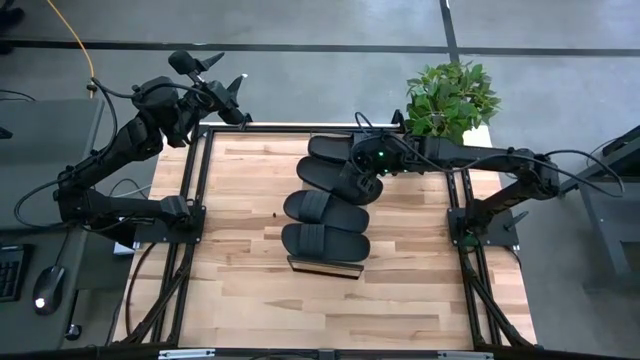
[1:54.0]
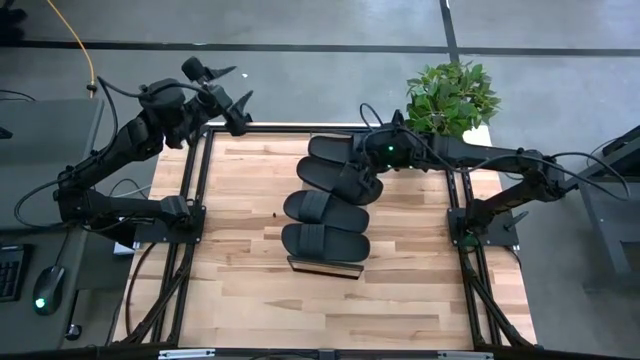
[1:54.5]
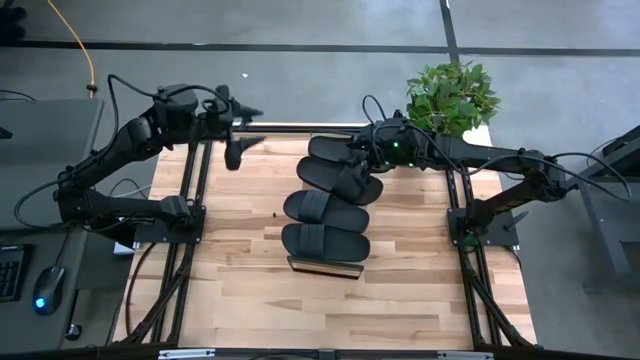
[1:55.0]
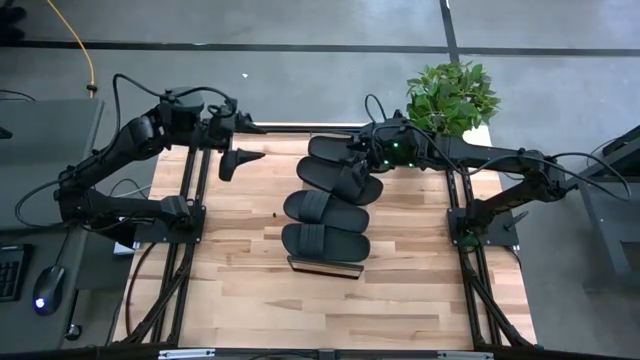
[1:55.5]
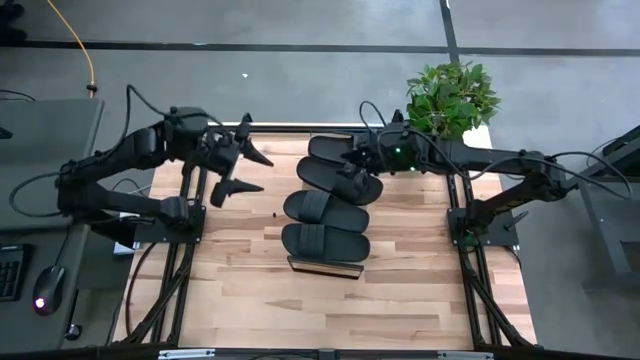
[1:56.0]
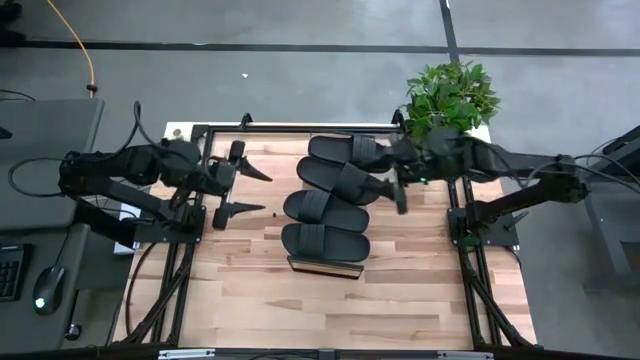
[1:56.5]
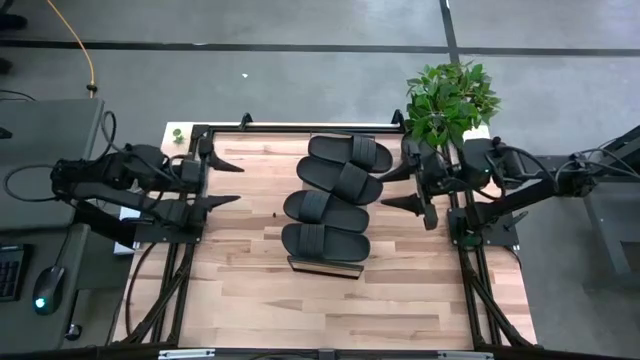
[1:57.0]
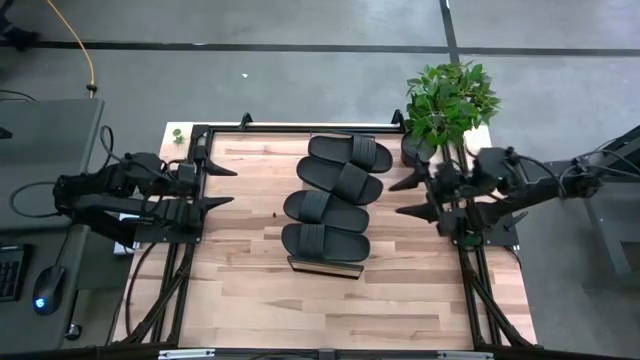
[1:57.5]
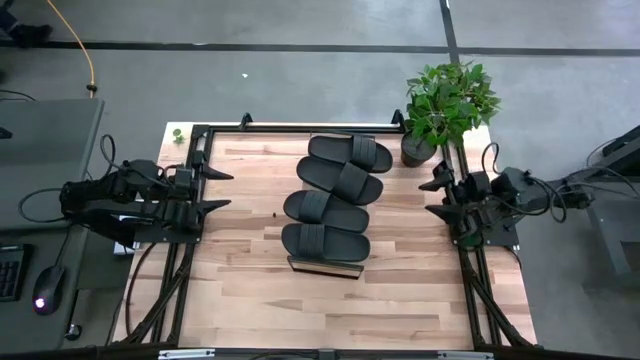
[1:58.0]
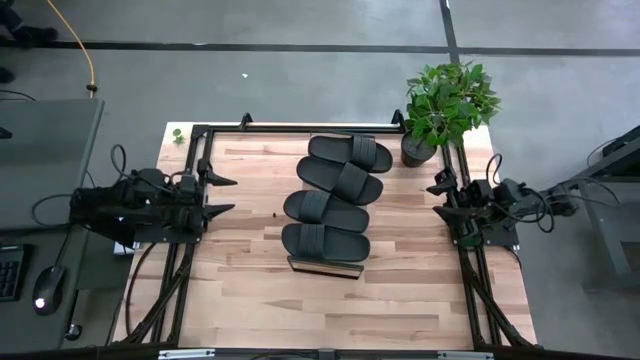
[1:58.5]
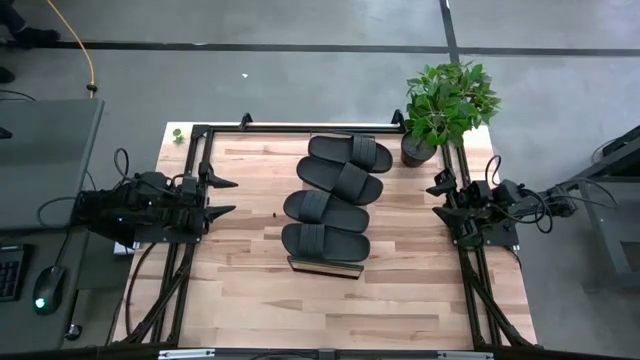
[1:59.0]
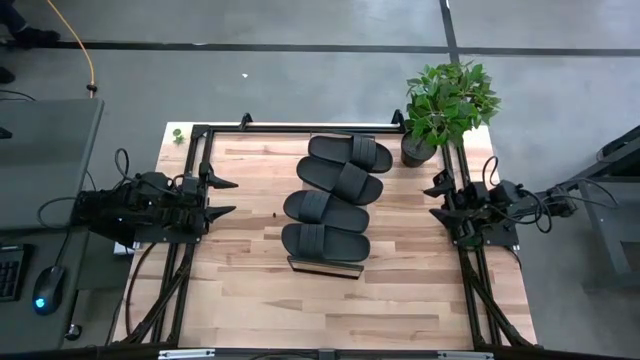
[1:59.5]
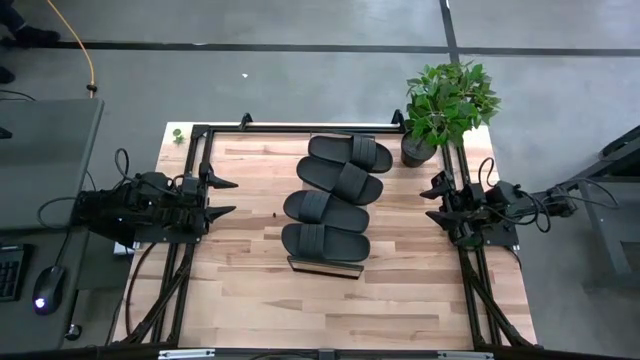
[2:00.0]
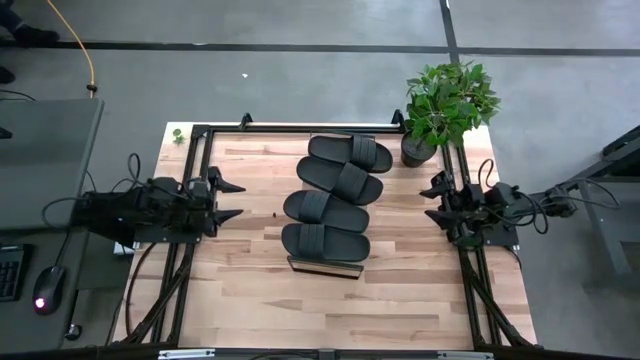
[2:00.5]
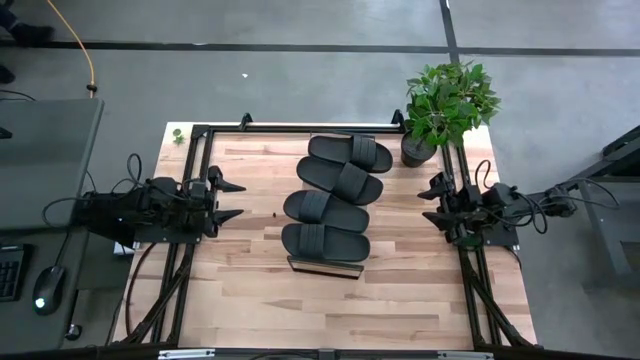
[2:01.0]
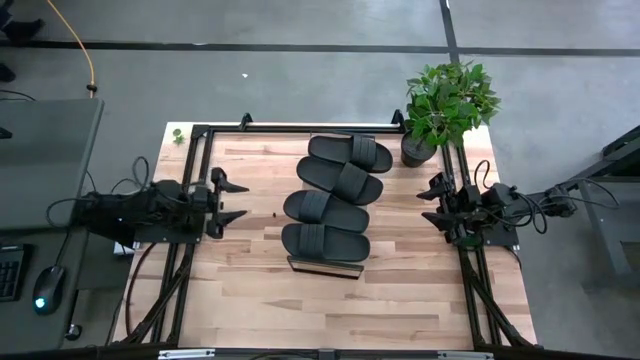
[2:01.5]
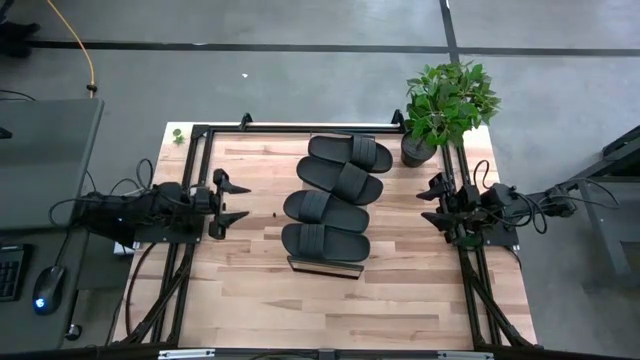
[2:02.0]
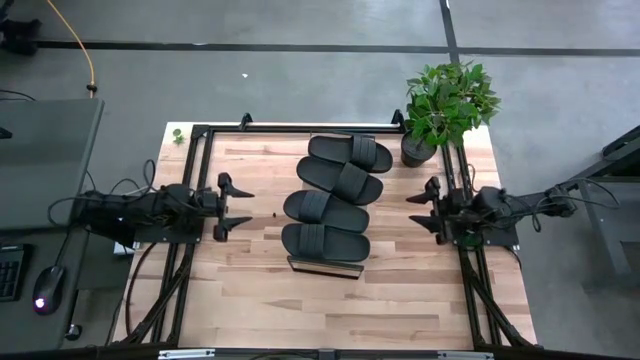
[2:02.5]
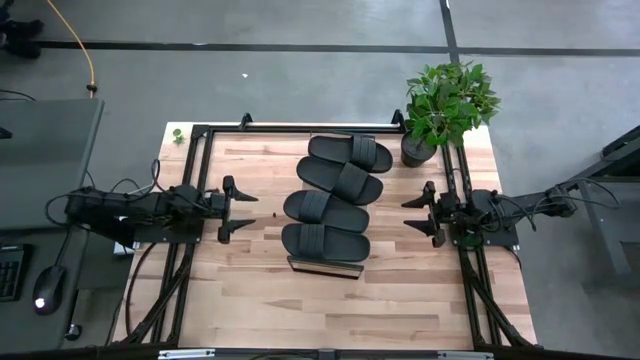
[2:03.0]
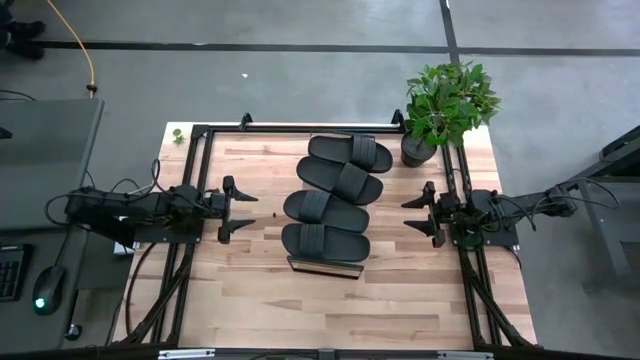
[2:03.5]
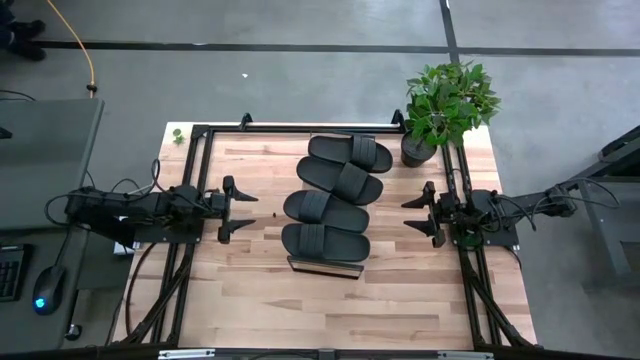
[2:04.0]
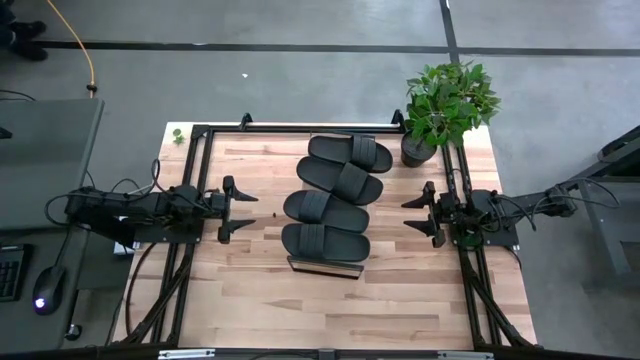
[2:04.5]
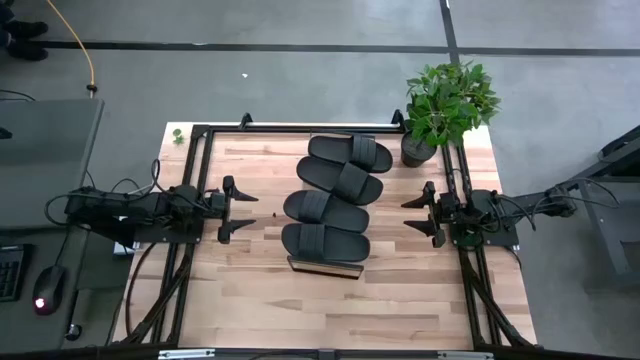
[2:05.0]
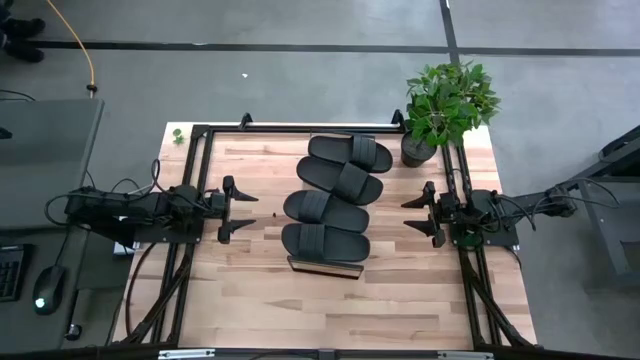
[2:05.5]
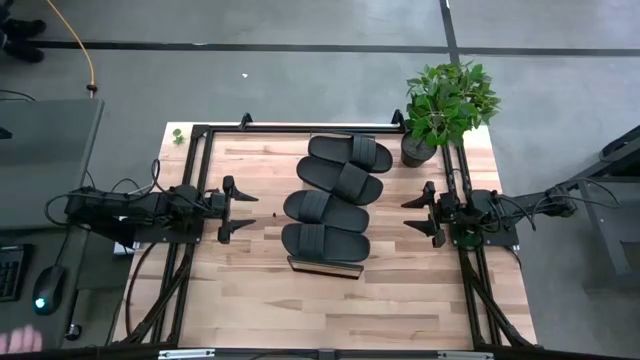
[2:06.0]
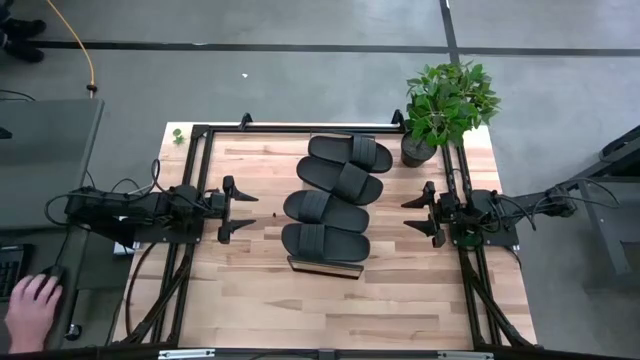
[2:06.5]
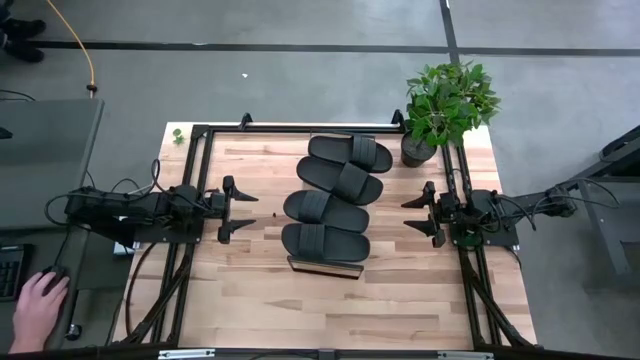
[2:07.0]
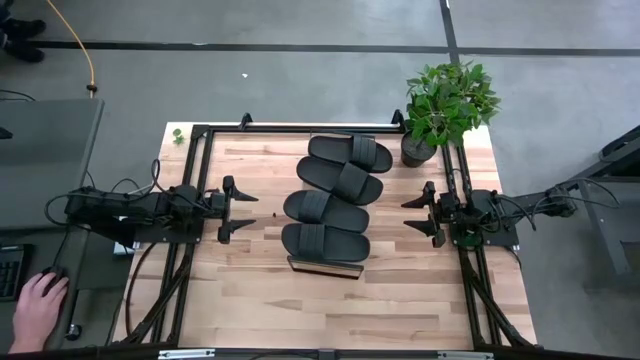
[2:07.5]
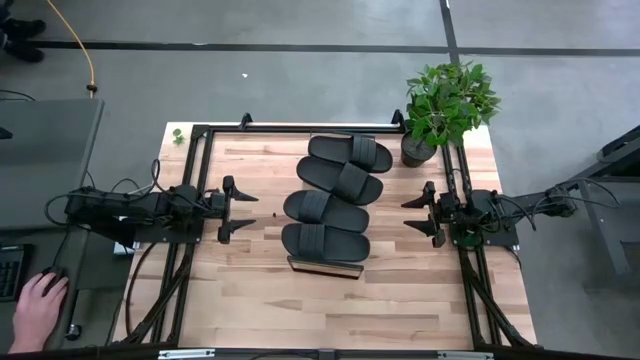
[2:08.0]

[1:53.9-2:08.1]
Task: Pick and place slides into the shelf
Return to Home Position

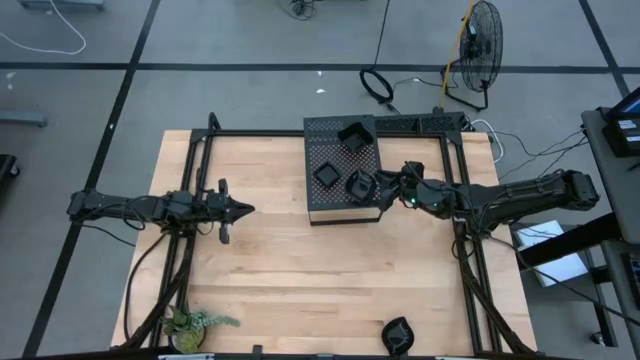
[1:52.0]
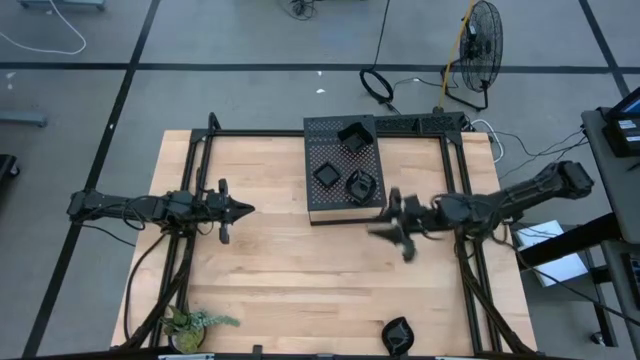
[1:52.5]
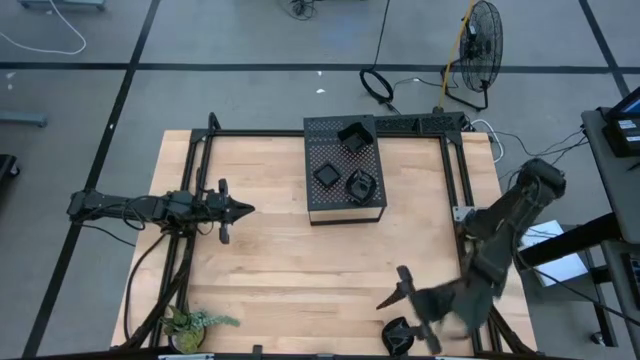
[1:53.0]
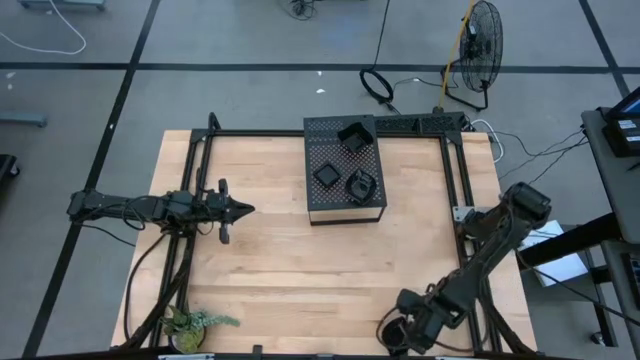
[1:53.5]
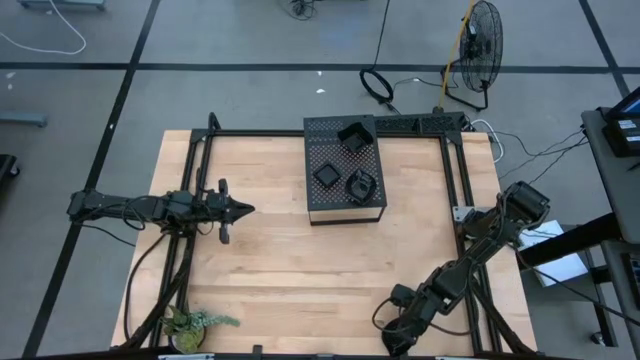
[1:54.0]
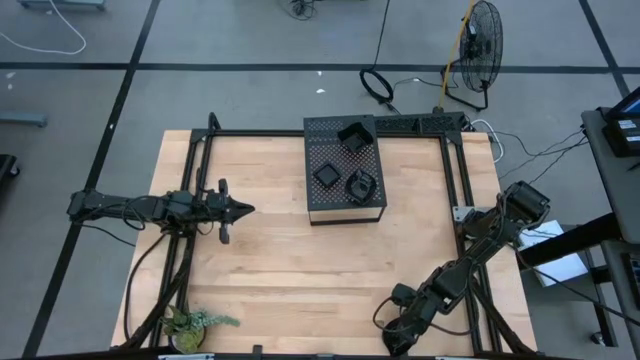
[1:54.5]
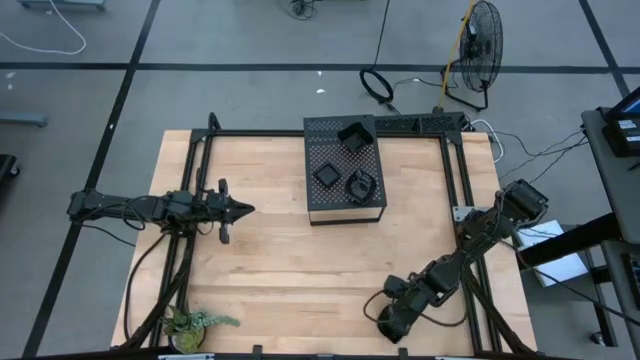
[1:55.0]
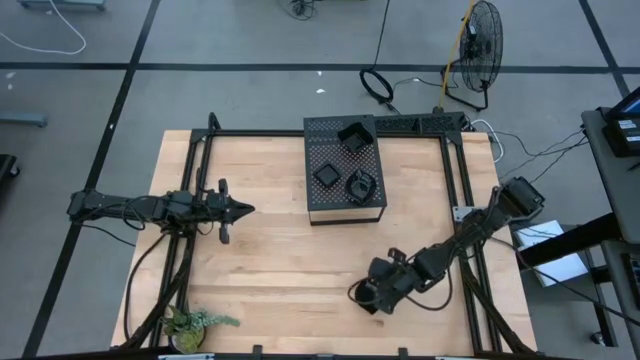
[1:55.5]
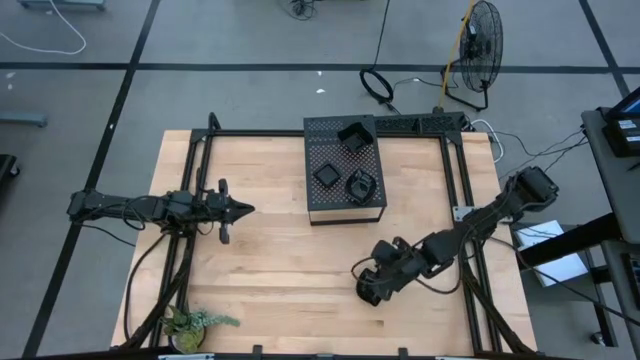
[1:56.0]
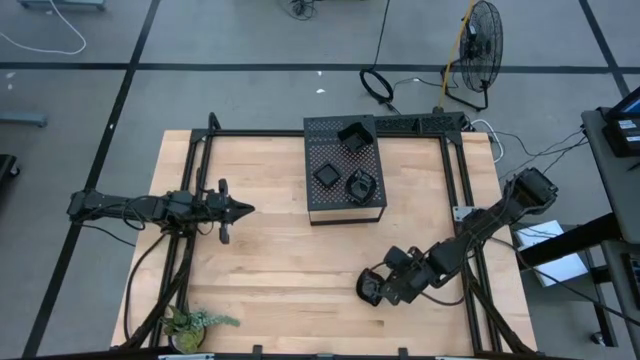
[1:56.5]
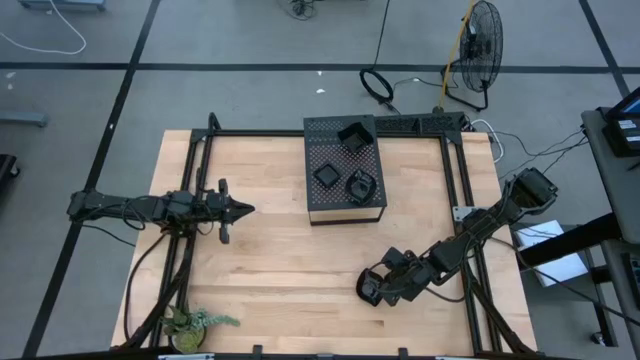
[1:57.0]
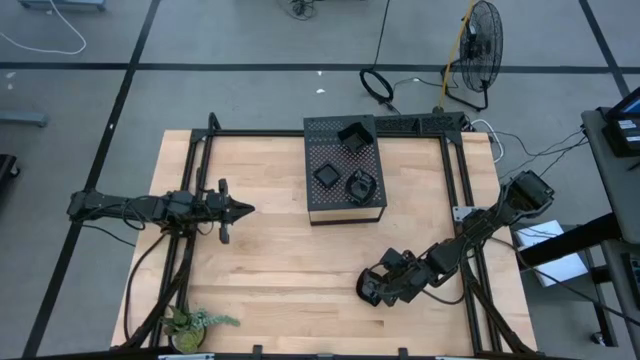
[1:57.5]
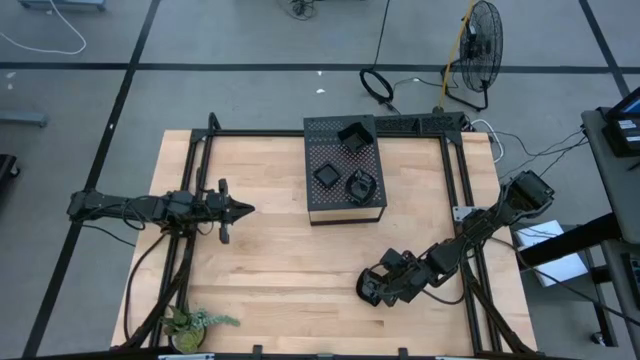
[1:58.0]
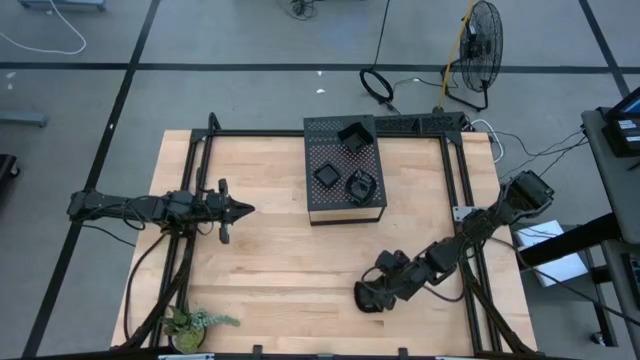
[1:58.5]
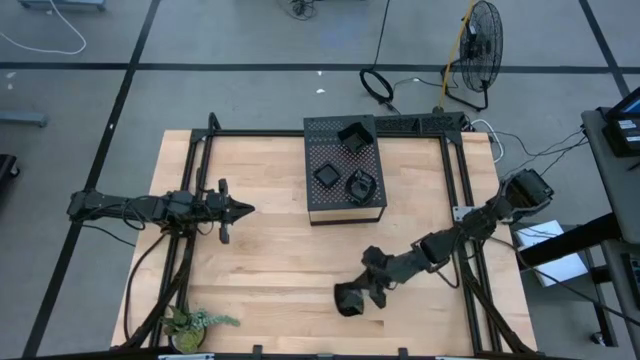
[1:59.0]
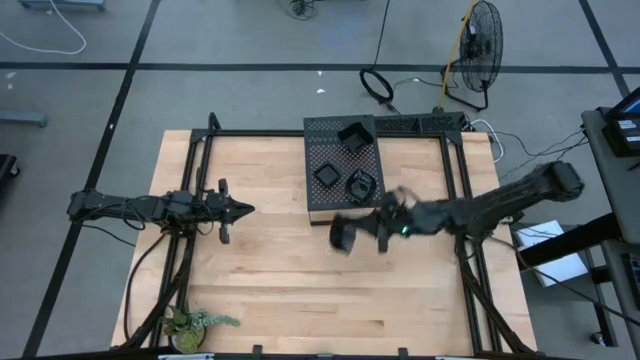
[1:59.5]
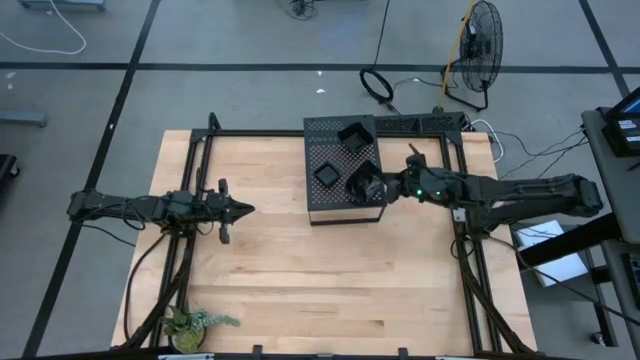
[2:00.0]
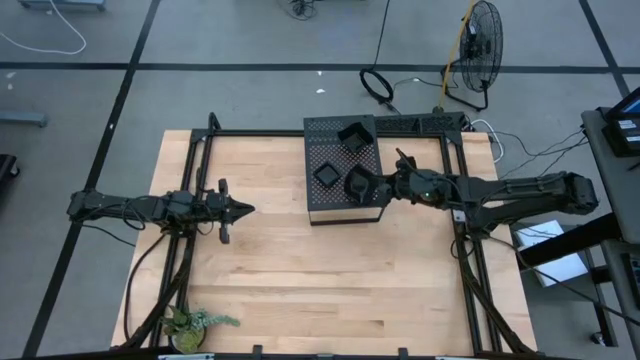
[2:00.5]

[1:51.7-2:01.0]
Task: Pick & Place Mini shaped plates
Stack the leaf shaped plate on top of the leaf shaped plate on the shelf
